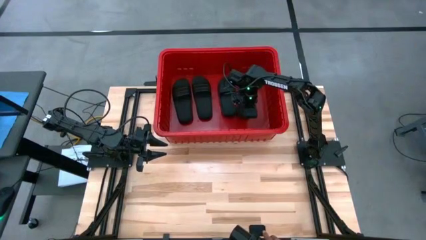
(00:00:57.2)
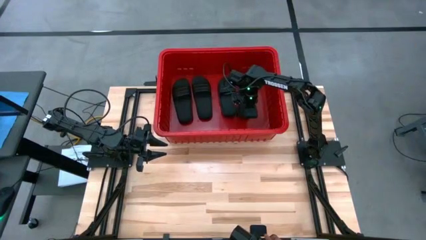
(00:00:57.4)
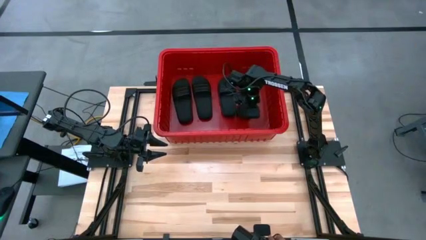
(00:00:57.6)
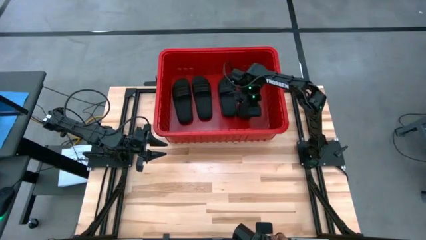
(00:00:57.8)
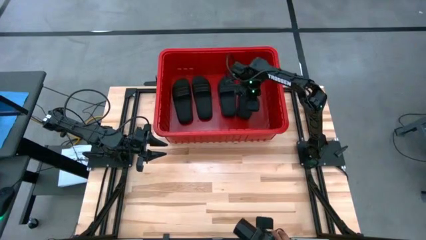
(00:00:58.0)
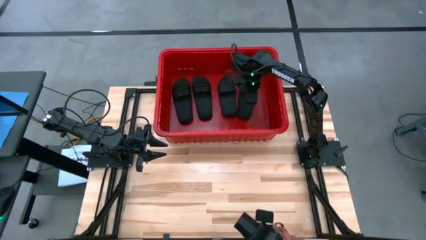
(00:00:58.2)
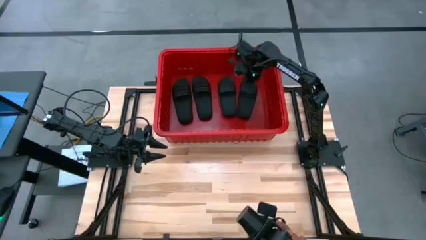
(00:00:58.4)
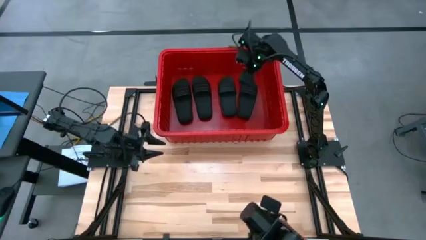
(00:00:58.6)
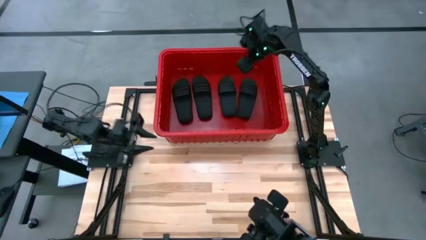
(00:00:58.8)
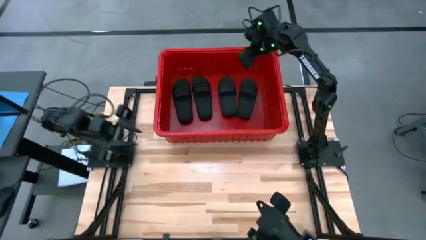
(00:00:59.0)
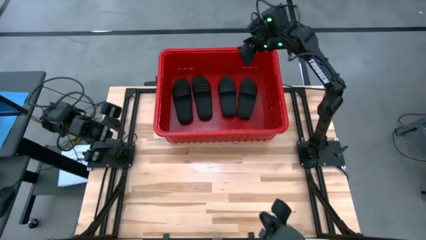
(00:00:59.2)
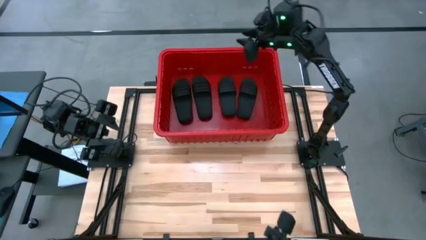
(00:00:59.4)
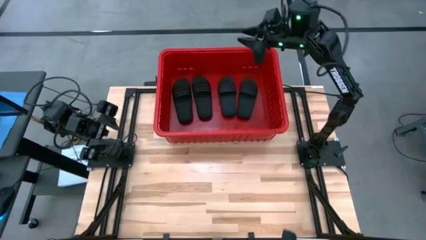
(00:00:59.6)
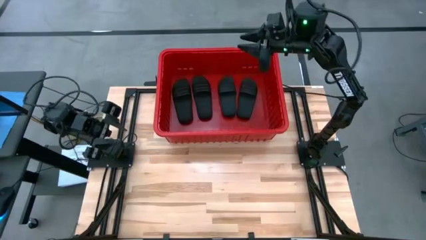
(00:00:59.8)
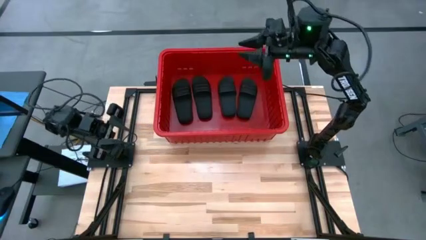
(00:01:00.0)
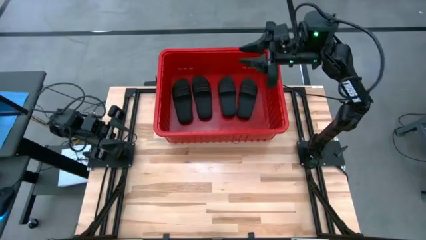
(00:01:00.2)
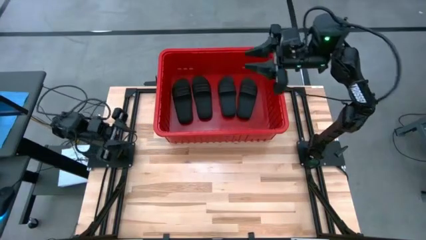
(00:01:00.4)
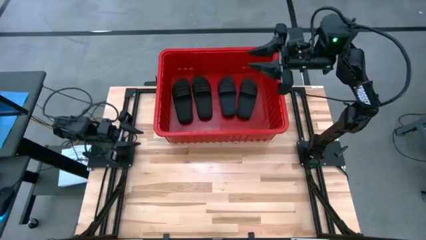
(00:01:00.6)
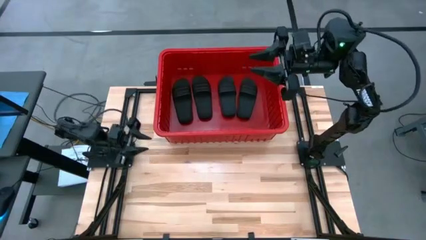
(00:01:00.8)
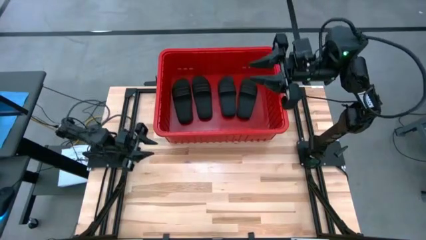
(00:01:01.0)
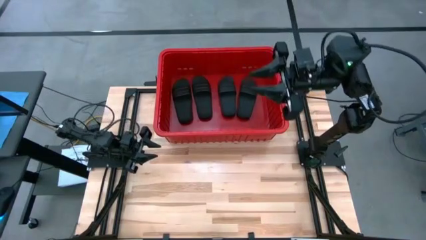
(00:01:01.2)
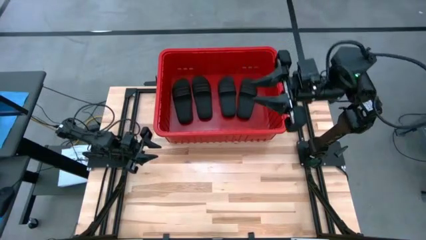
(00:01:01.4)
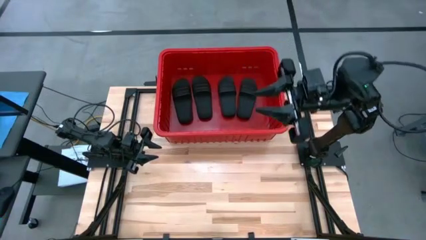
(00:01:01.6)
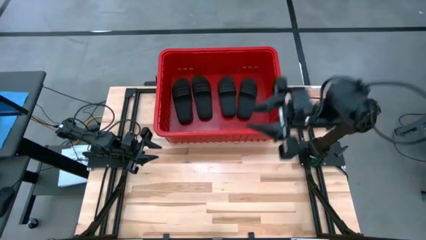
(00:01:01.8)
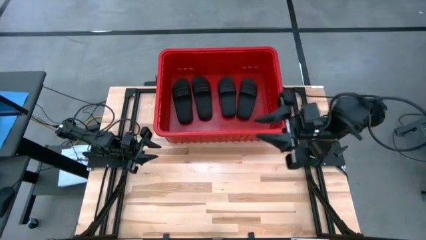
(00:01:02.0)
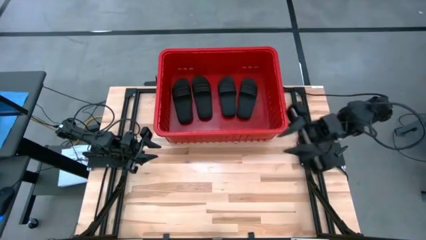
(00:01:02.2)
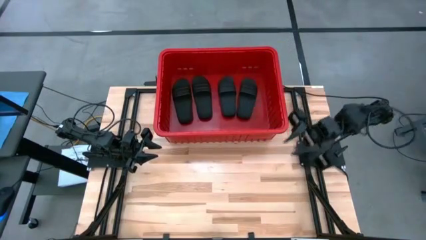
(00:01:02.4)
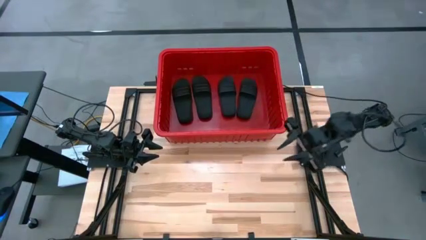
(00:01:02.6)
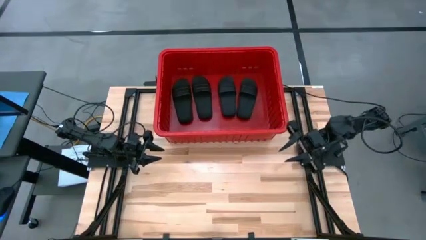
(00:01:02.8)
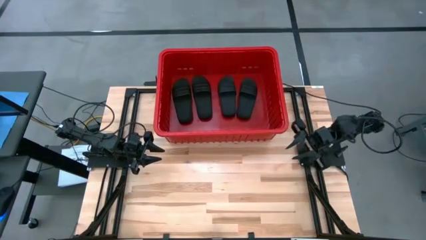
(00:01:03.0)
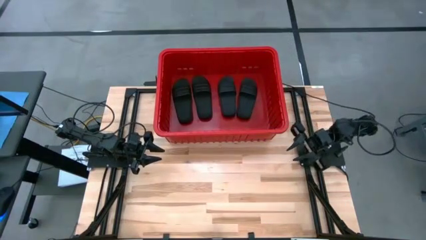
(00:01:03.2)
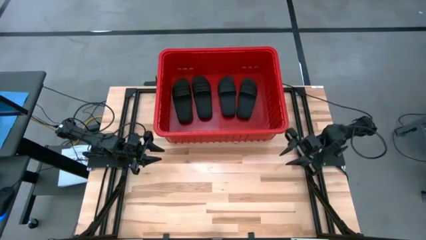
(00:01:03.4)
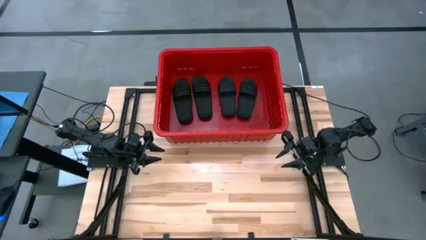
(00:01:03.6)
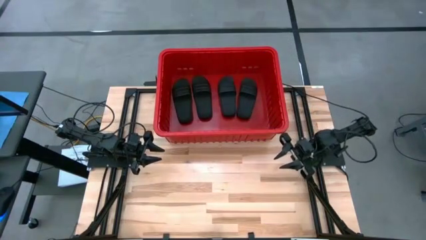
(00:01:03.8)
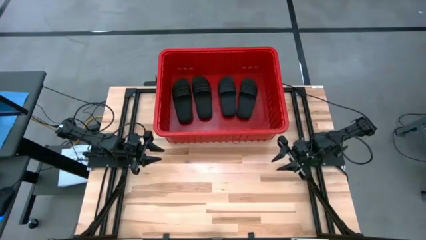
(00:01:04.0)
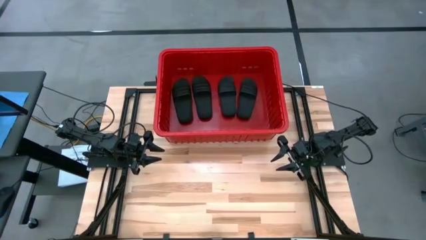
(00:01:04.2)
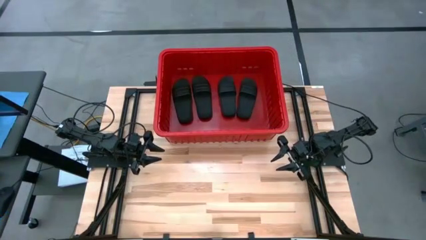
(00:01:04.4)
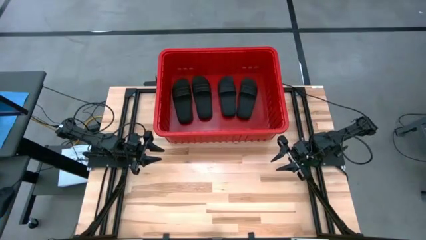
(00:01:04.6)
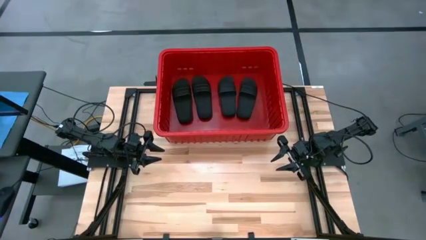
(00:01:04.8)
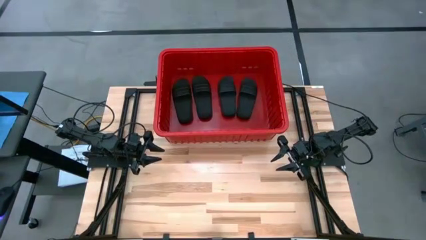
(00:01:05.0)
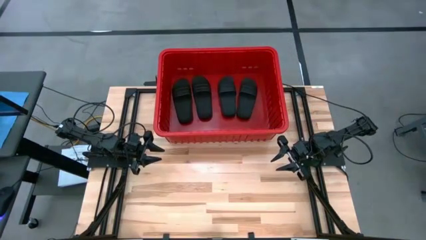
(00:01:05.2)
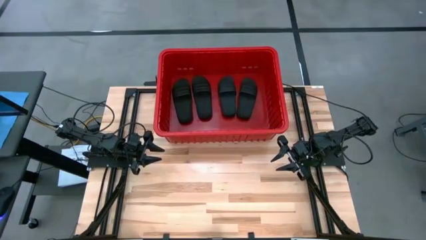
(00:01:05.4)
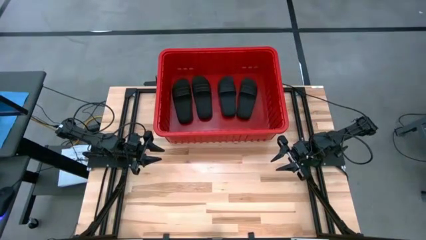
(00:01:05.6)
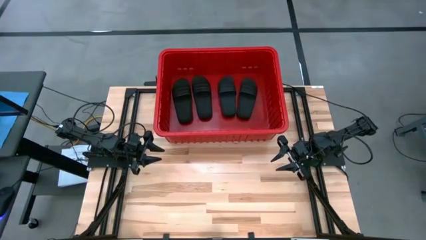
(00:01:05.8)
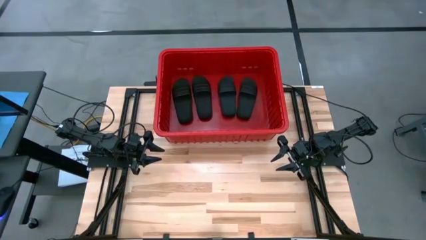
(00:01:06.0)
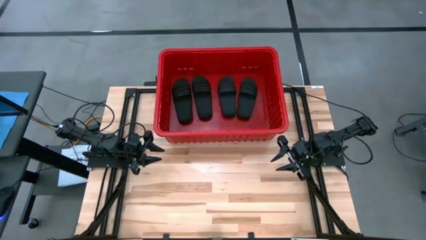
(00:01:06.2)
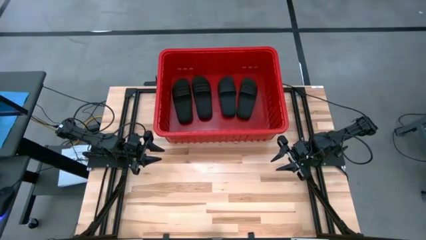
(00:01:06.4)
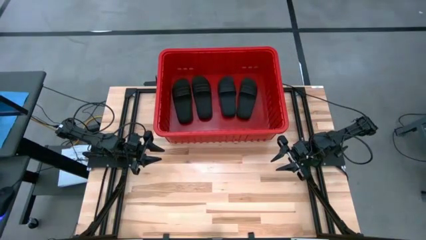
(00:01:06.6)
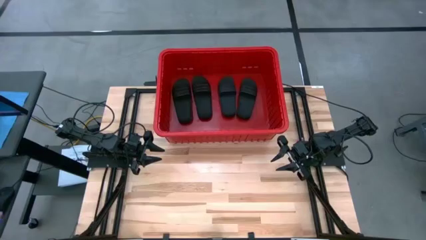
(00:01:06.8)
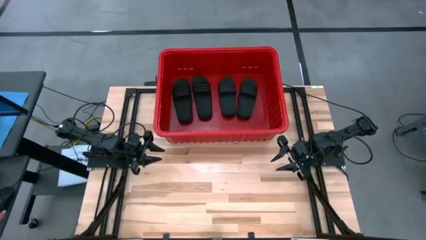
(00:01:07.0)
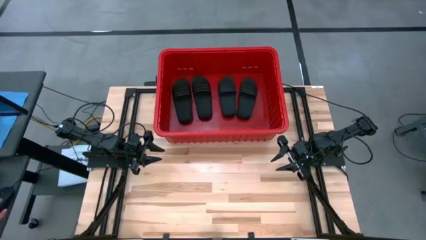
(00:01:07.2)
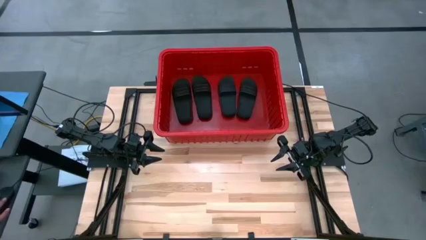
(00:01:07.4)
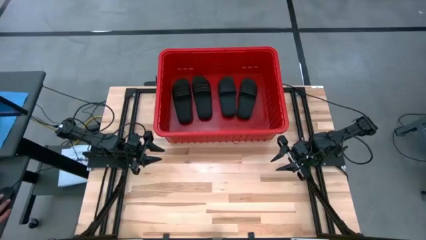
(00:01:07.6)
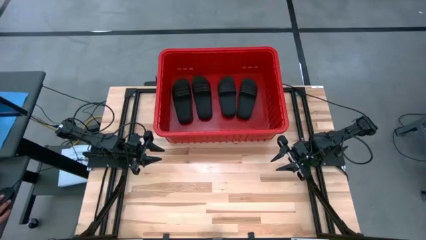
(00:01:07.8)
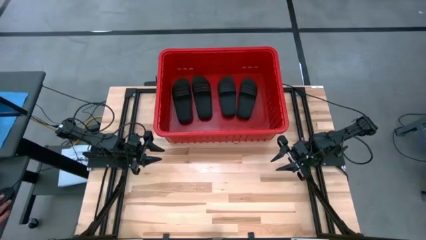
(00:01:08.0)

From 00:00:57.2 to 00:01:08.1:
Task: Pick and place slides into bin
Return to home position
